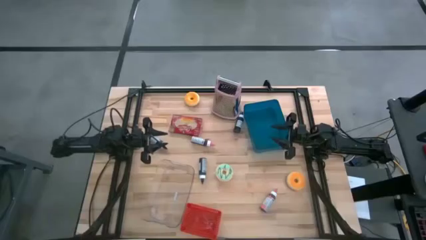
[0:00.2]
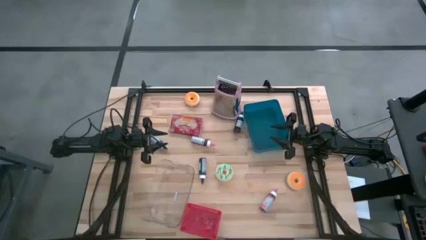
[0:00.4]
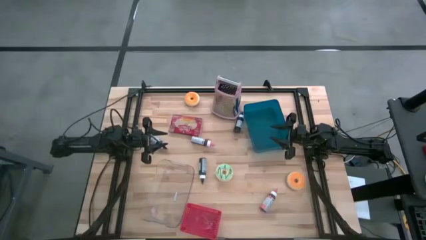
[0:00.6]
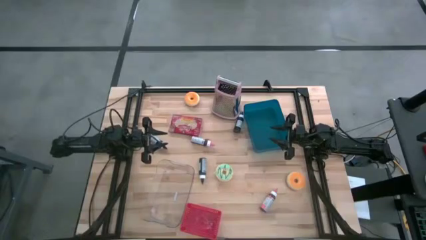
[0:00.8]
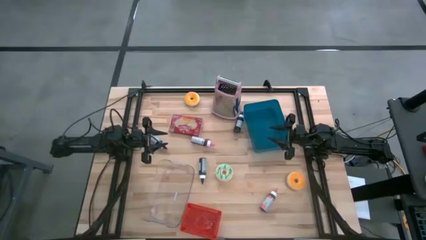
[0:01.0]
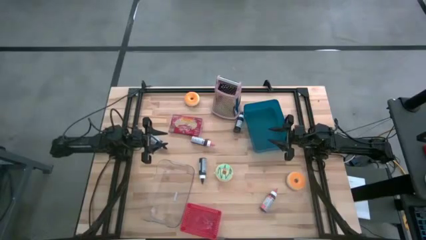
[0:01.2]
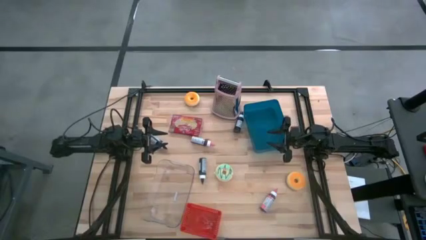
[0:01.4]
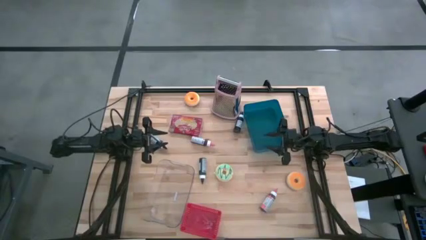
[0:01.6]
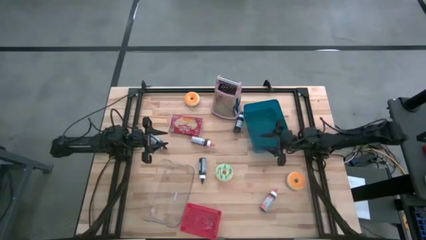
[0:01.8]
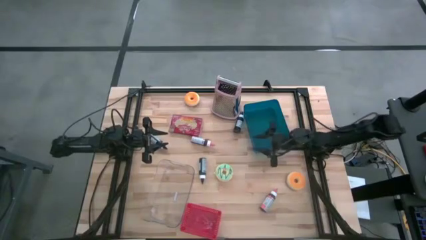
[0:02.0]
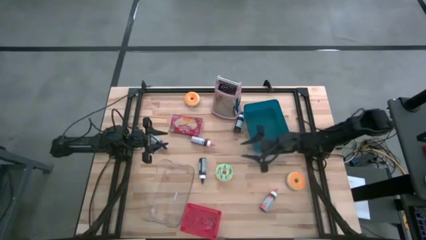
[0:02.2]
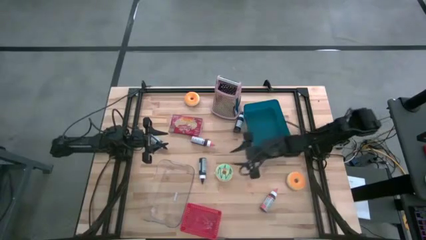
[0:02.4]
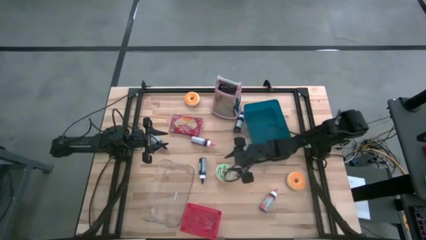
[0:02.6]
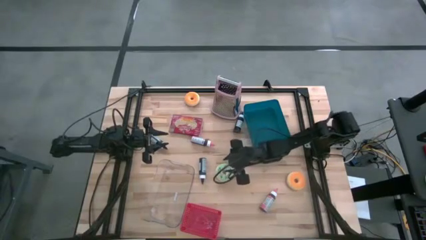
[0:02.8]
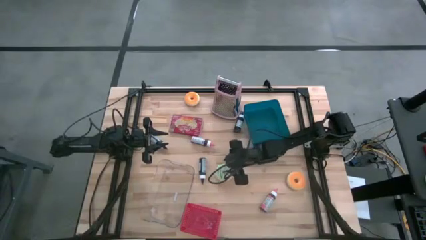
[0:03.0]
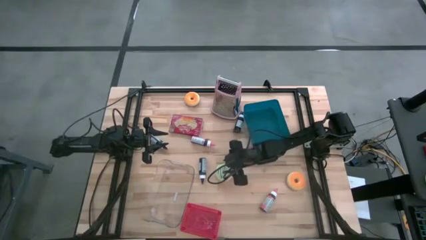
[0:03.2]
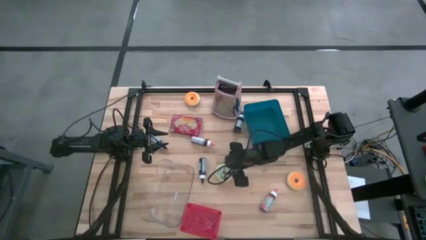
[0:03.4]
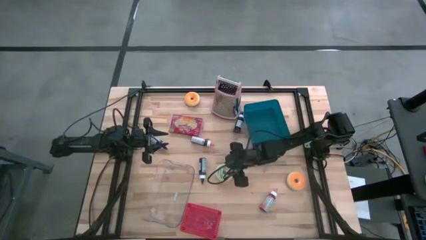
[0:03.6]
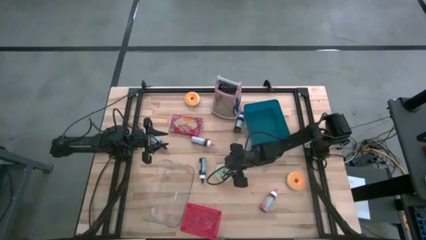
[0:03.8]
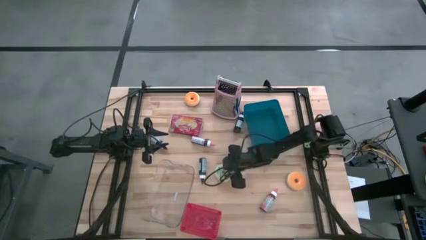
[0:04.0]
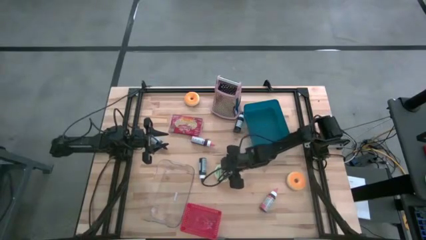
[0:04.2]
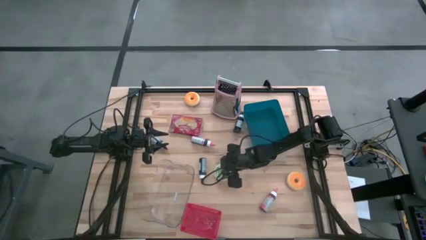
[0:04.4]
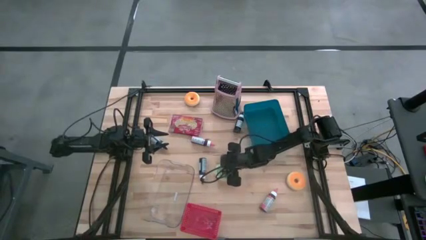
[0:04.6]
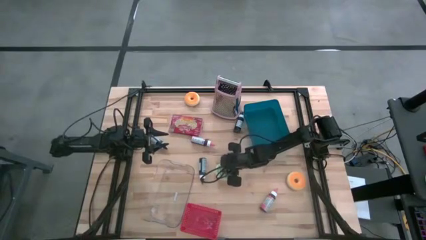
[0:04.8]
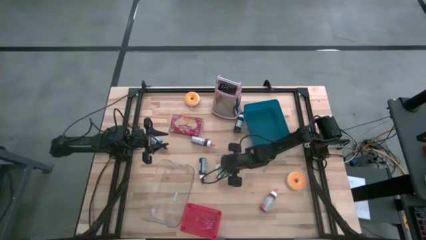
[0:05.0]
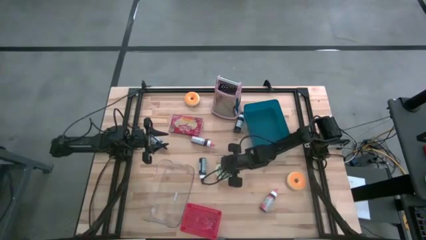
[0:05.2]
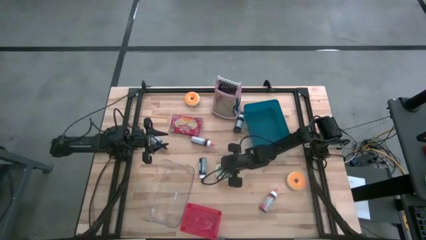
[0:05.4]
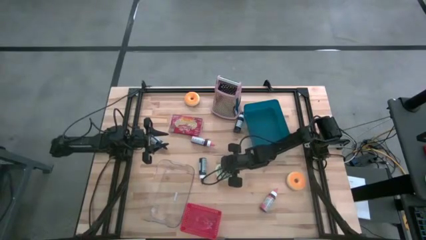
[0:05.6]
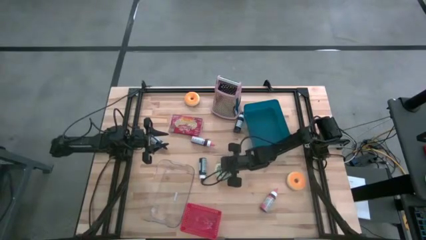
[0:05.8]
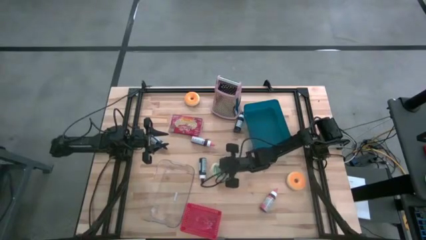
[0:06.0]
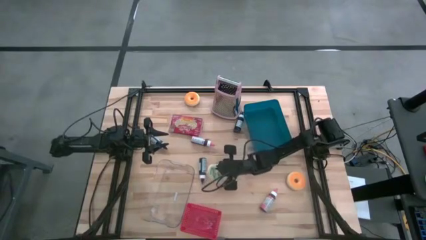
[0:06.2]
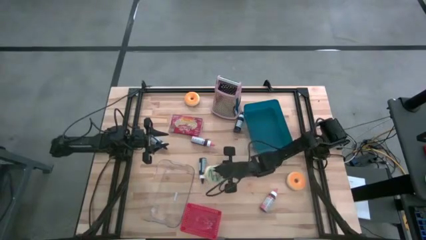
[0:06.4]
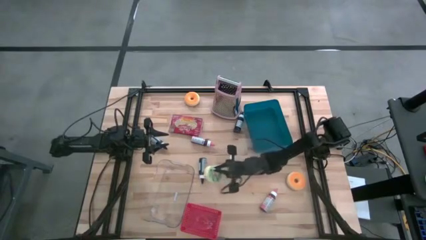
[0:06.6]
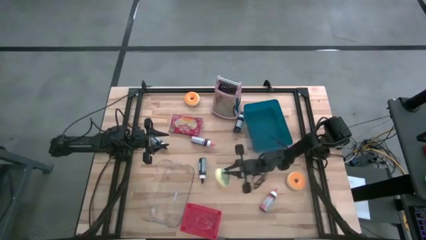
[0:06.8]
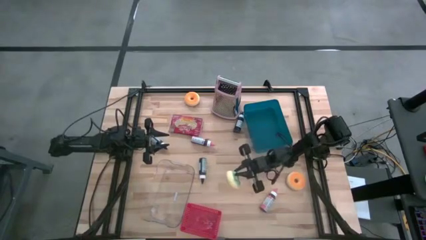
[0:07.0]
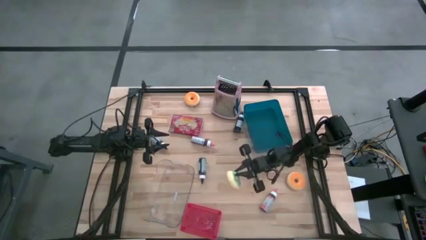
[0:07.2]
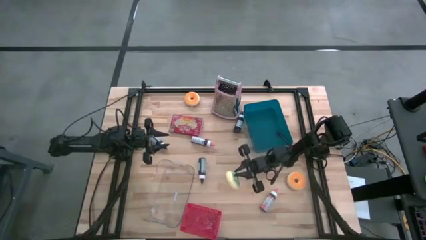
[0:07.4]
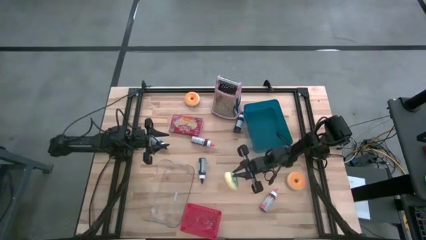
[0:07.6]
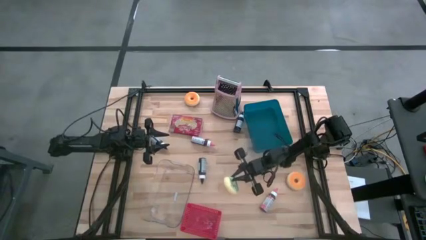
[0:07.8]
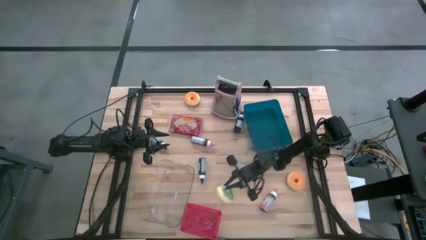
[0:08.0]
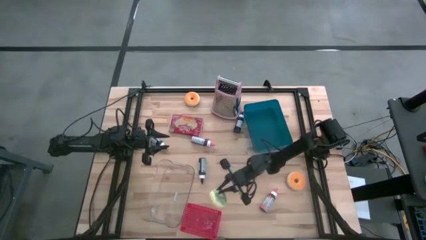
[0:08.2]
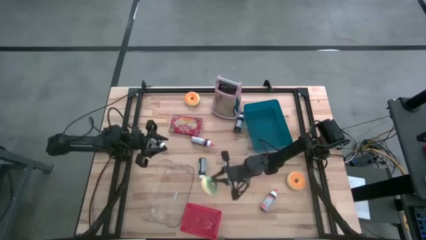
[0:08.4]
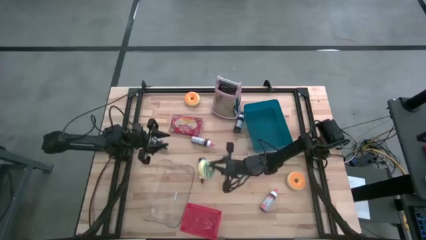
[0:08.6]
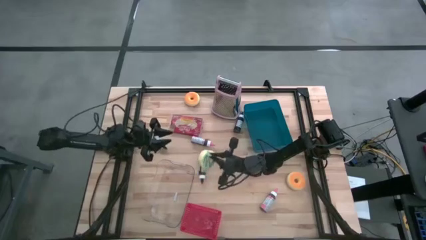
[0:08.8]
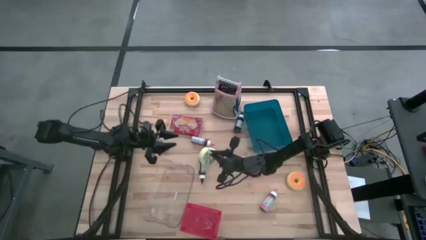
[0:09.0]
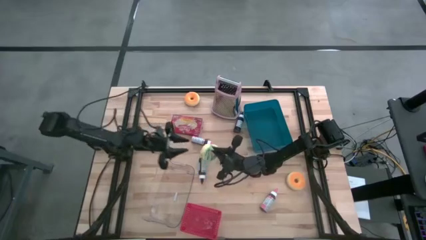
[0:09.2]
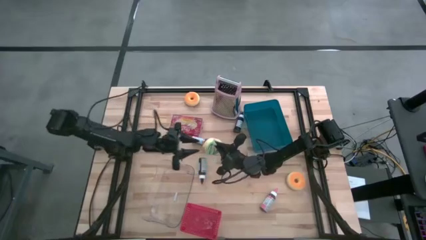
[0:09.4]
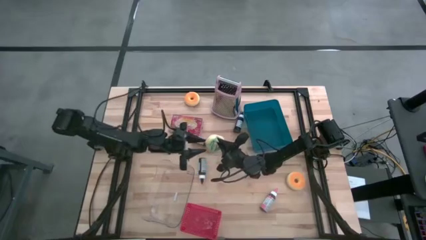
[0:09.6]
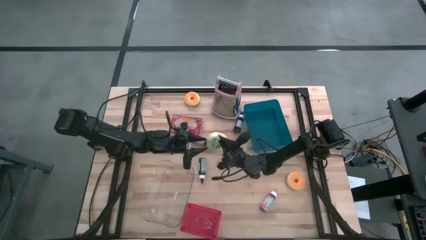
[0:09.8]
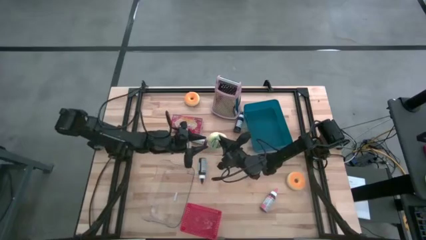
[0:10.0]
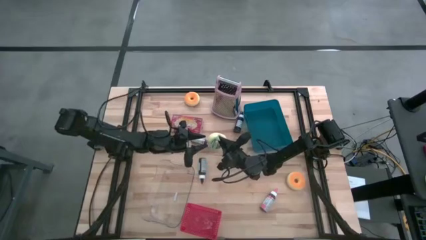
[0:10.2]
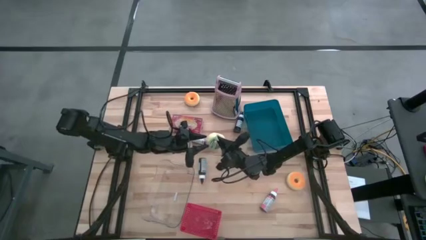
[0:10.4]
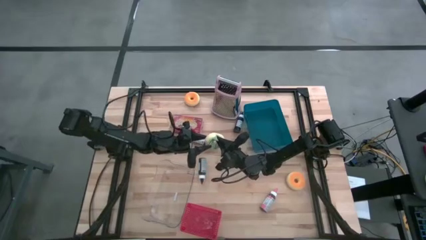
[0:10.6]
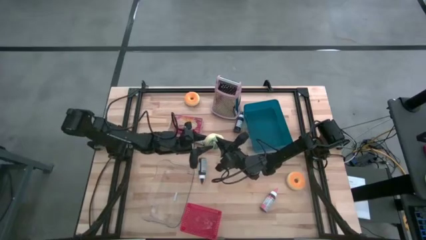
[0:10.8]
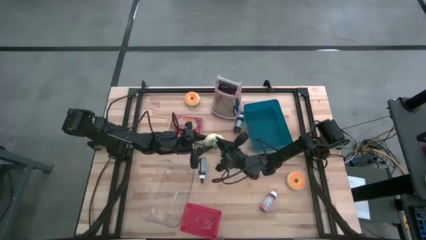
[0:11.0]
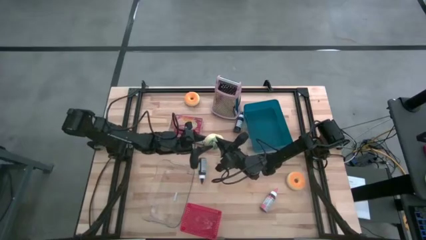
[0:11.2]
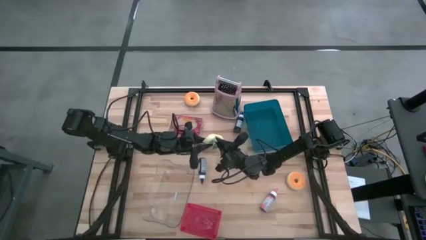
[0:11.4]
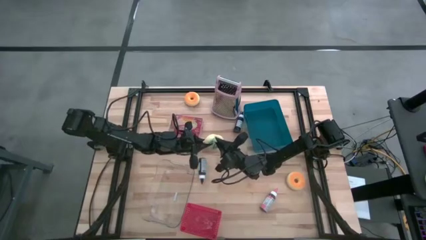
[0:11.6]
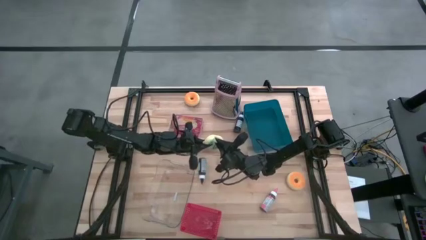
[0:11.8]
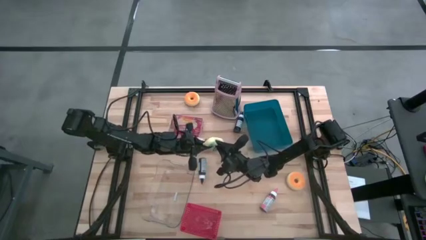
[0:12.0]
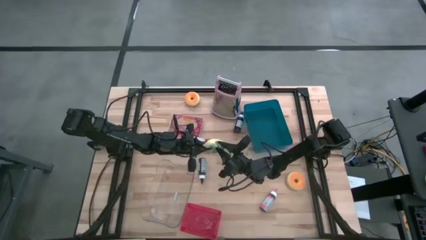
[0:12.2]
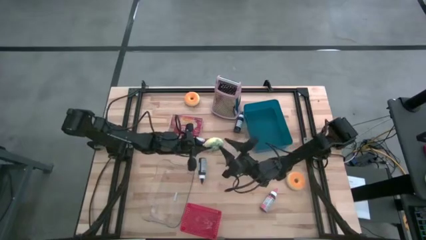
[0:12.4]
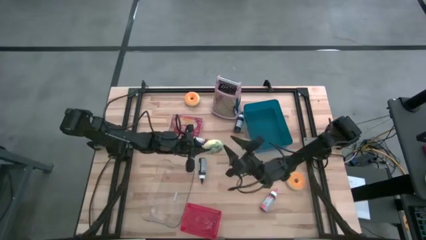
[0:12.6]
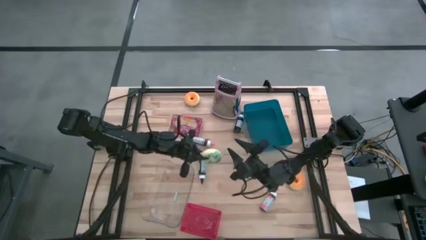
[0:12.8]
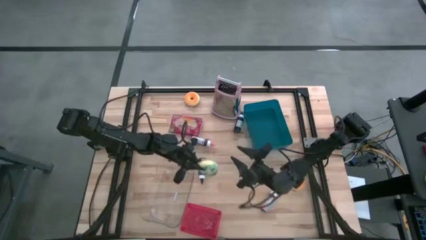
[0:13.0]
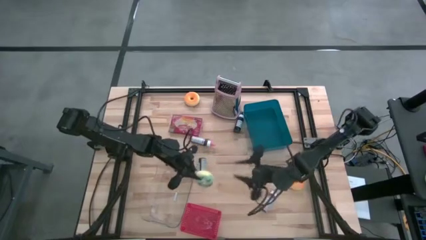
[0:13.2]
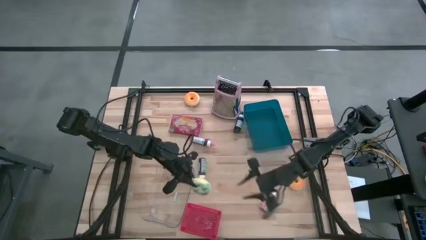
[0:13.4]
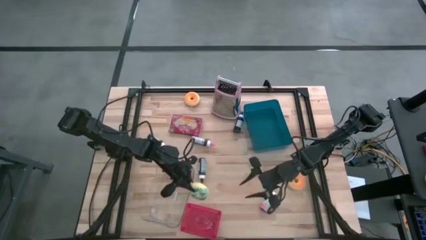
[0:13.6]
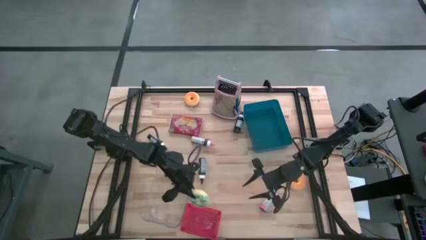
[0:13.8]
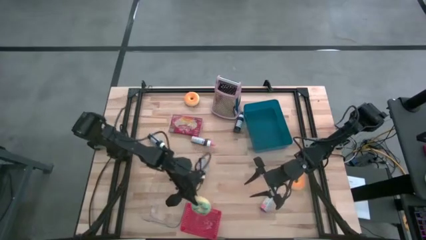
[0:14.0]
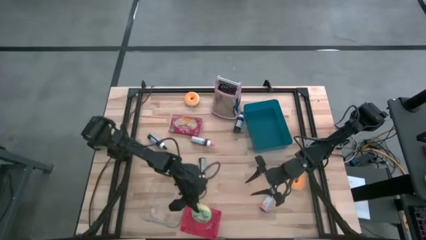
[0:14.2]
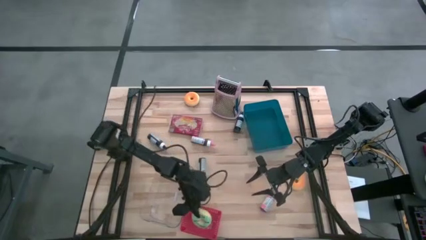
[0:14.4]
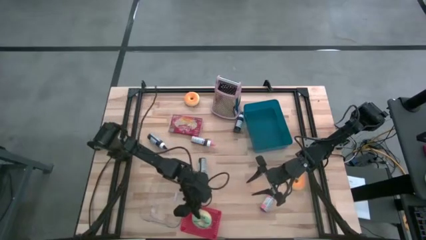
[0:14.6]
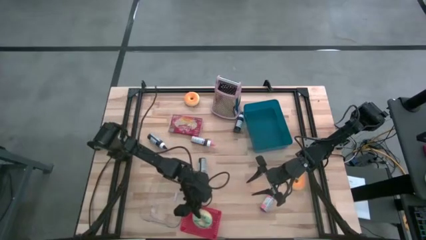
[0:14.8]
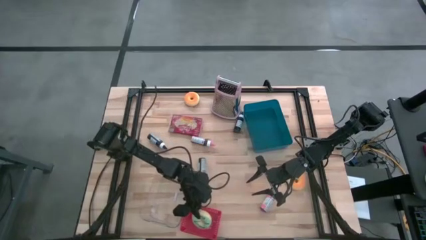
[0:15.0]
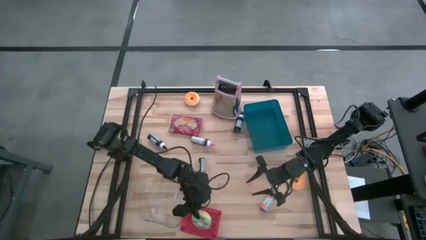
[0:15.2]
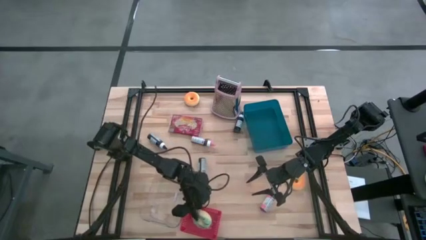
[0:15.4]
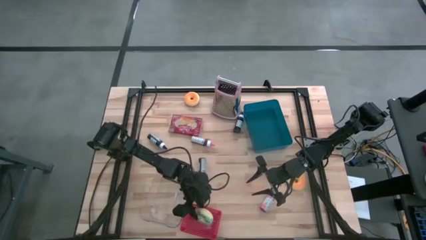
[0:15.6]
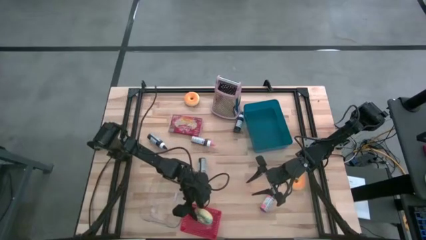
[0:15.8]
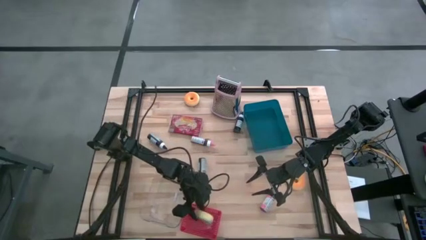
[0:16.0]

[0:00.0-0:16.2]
Task: Pick & Place Food Item
Put the green donut into the red bin
